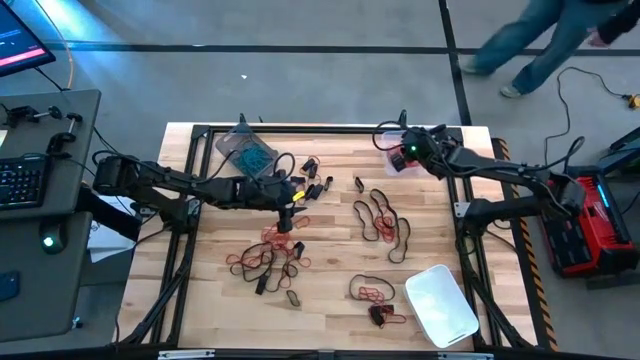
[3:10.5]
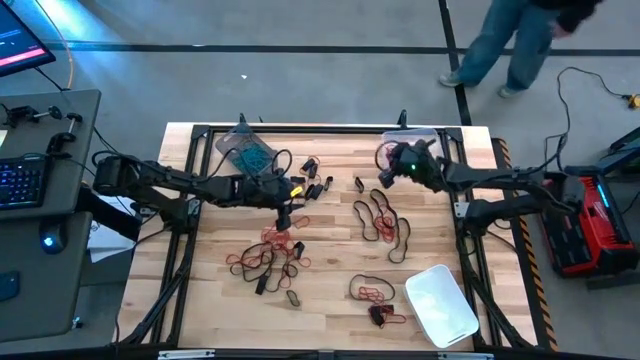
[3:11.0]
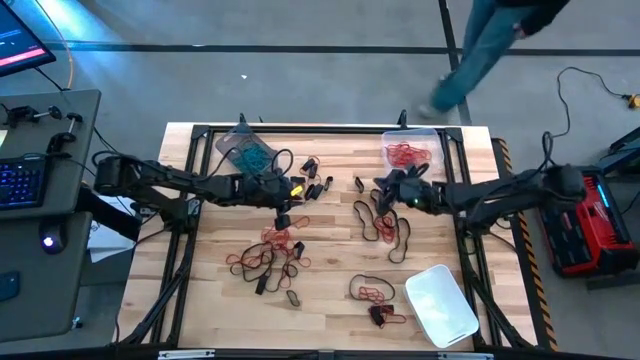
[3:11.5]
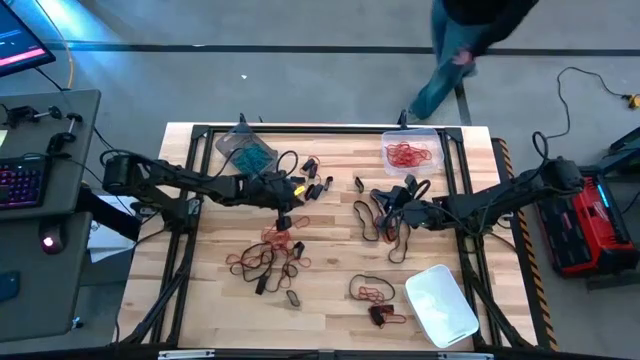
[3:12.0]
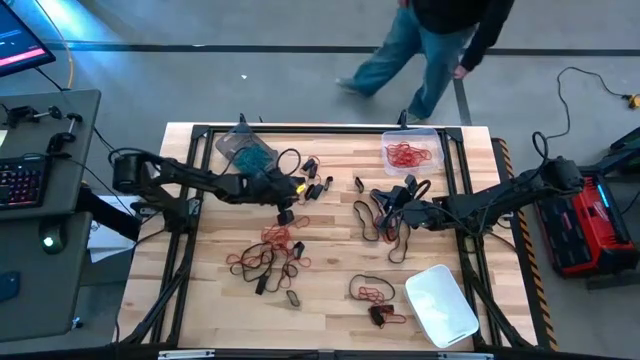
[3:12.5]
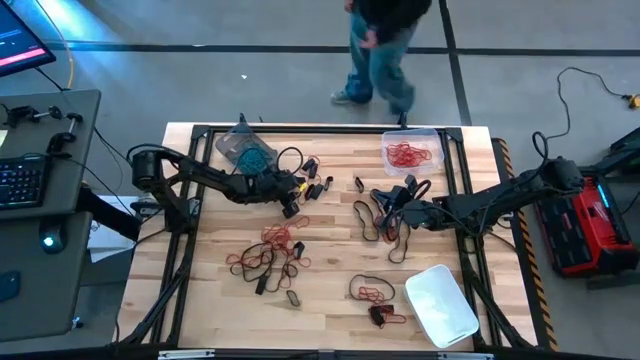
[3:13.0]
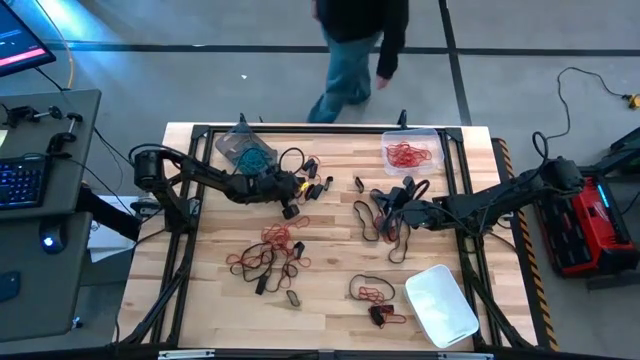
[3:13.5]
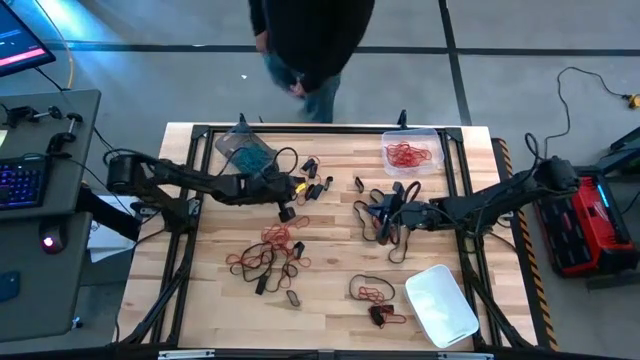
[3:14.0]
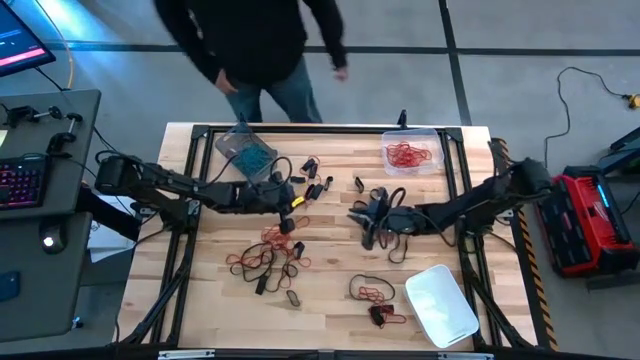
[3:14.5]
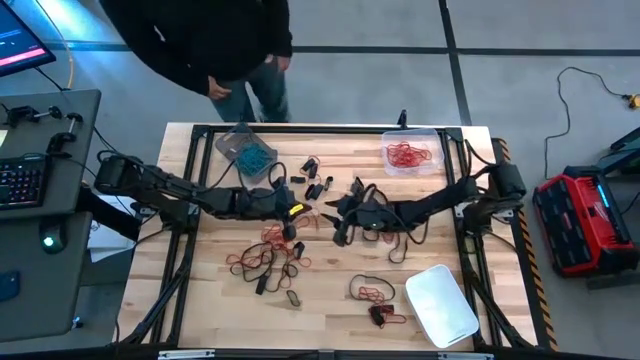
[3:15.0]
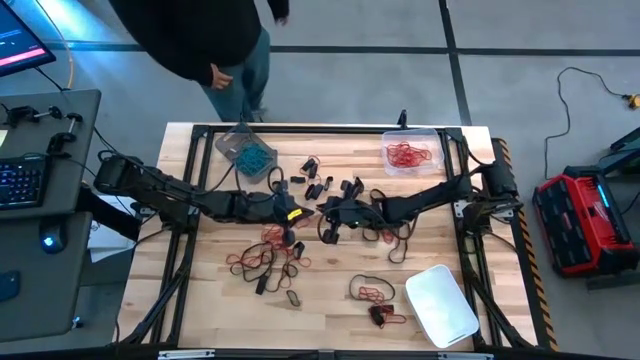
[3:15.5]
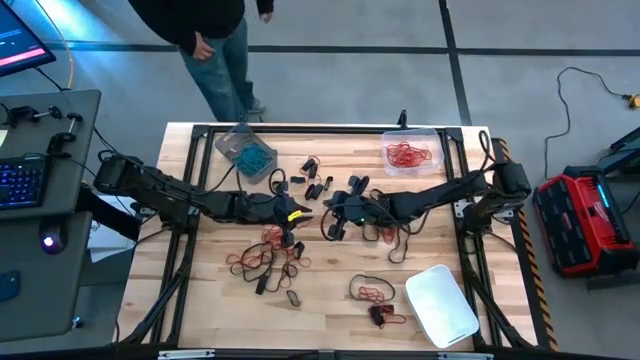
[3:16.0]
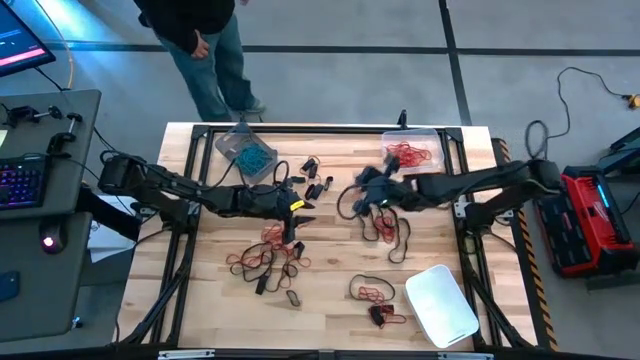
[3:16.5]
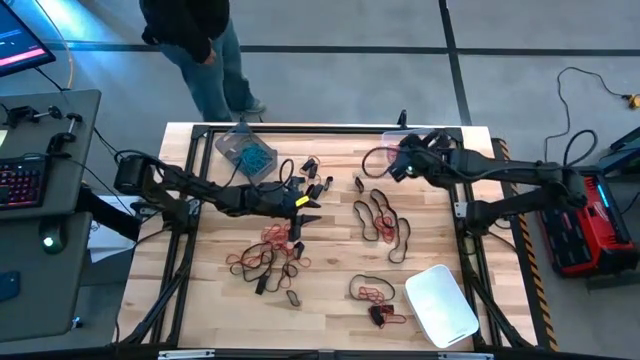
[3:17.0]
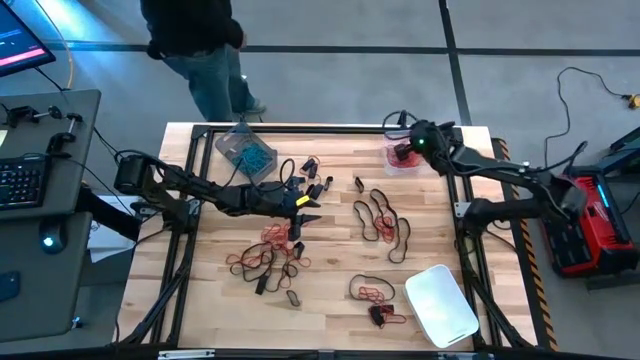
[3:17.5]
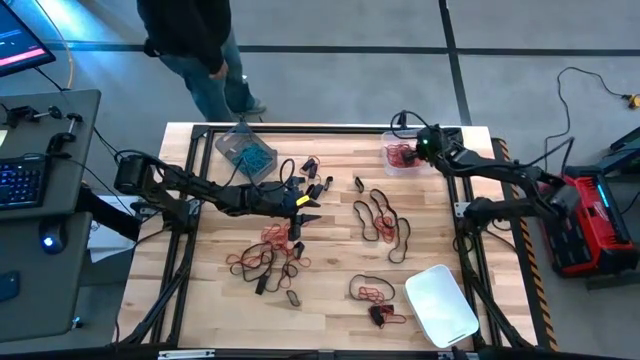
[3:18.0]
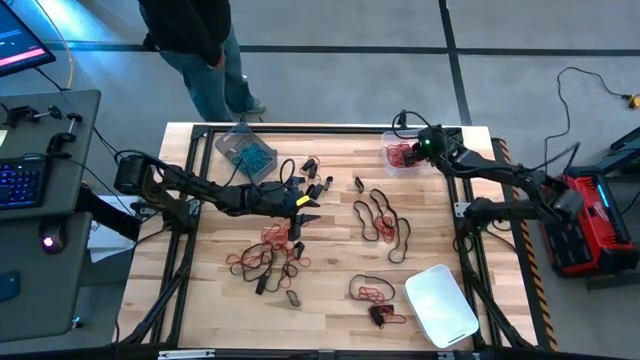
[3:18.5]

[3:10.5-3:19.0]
Task: Sort rubber bands into baskets
Put the red rubber band into the transparent bin

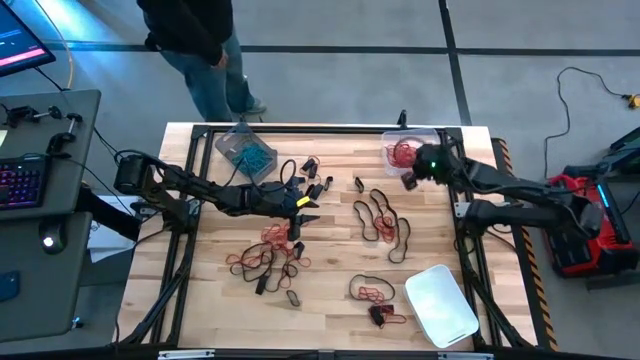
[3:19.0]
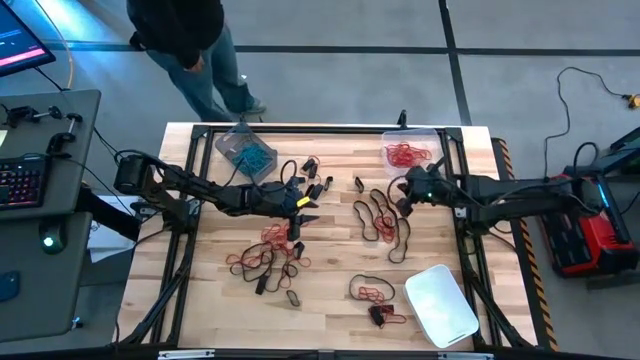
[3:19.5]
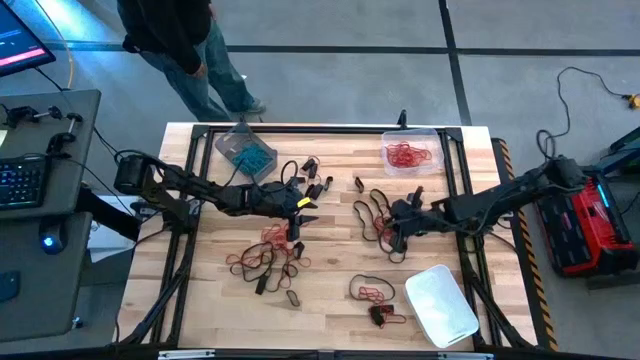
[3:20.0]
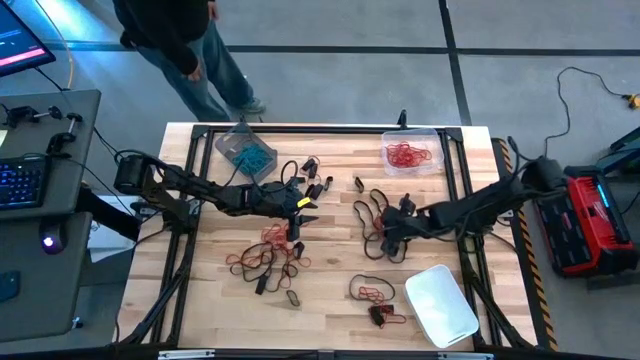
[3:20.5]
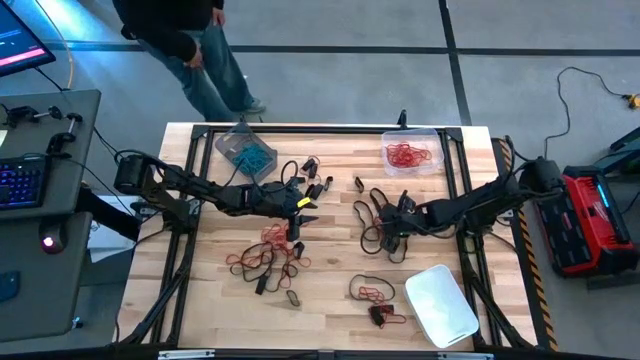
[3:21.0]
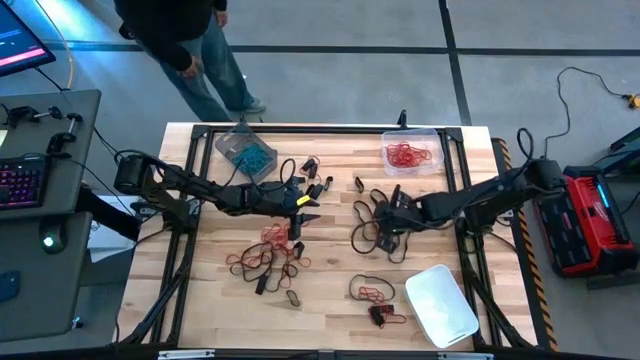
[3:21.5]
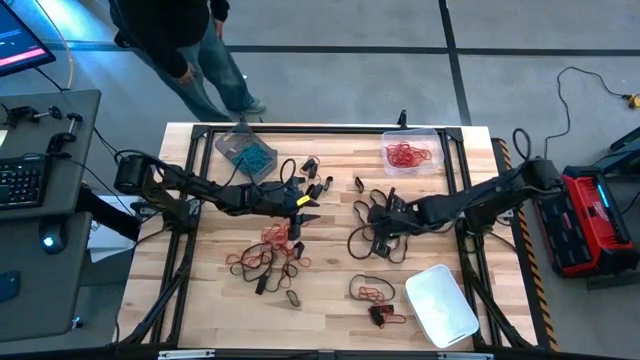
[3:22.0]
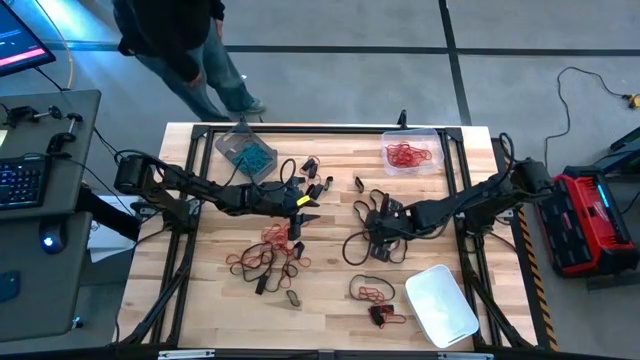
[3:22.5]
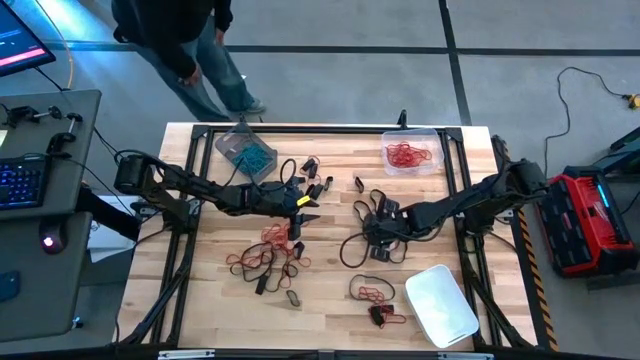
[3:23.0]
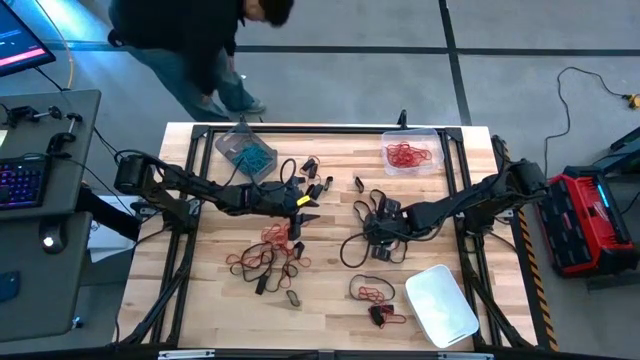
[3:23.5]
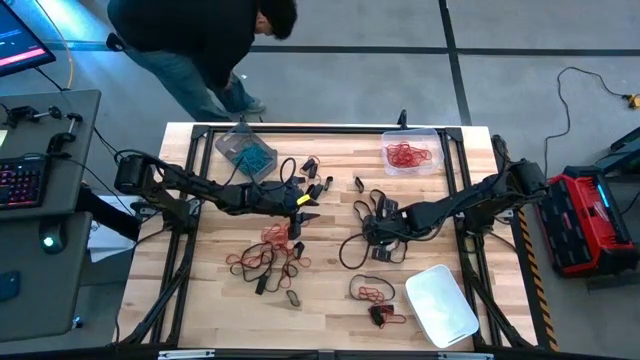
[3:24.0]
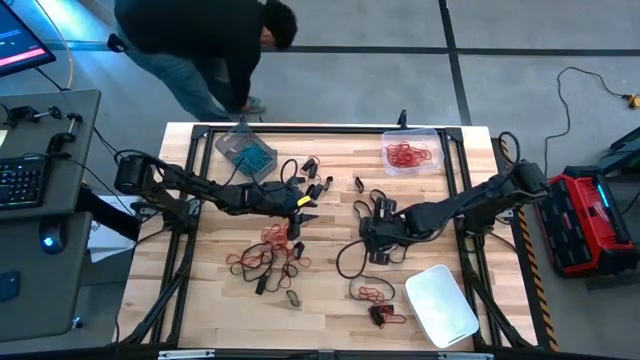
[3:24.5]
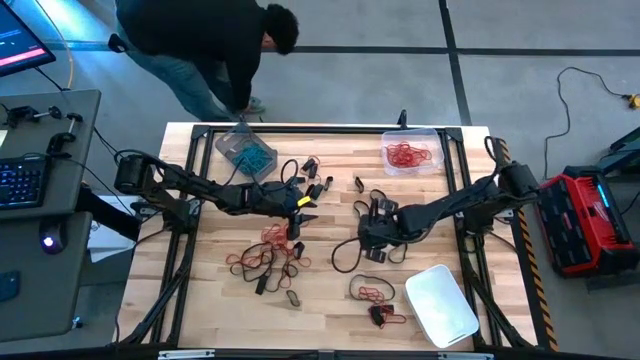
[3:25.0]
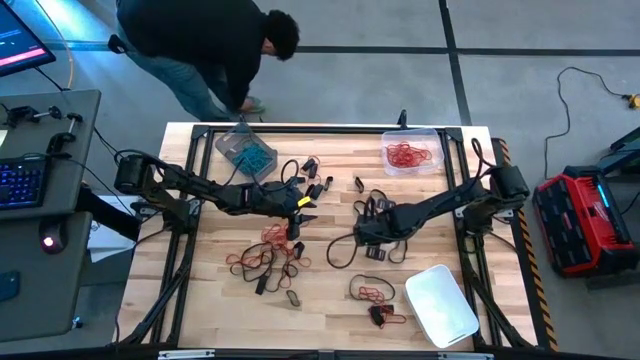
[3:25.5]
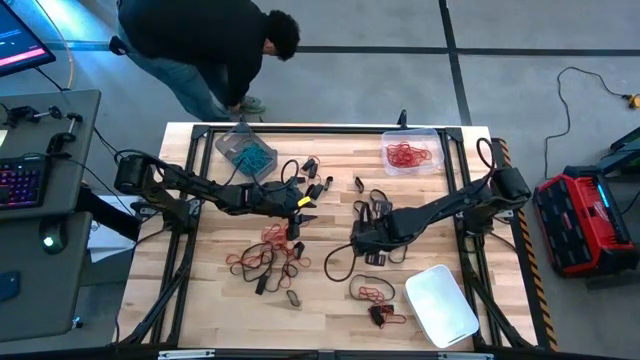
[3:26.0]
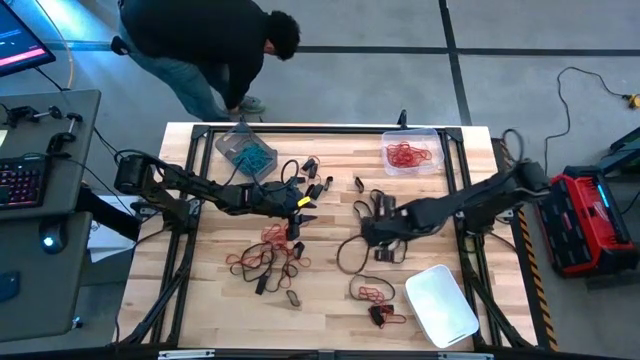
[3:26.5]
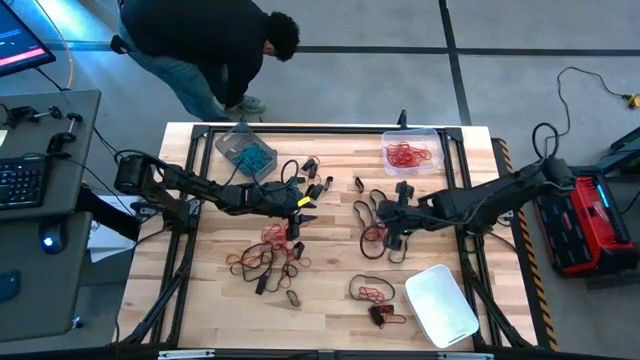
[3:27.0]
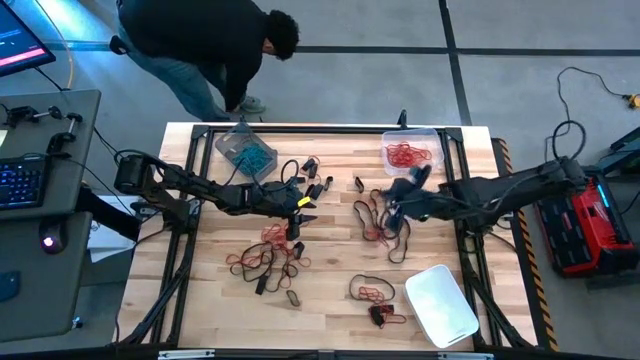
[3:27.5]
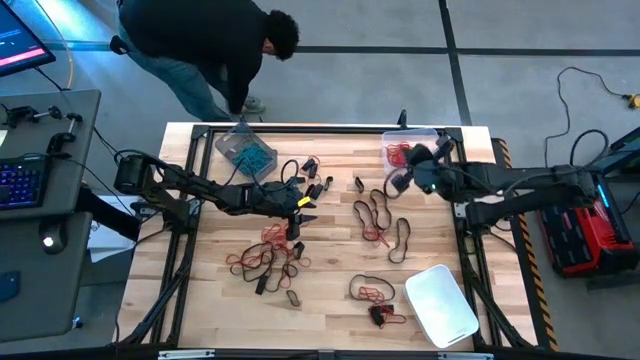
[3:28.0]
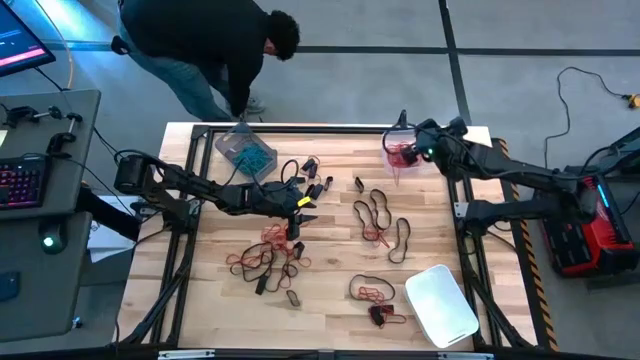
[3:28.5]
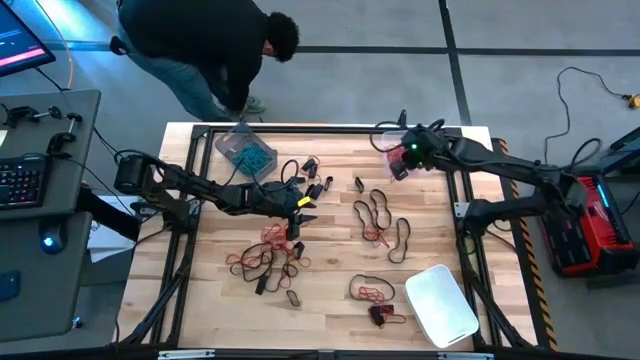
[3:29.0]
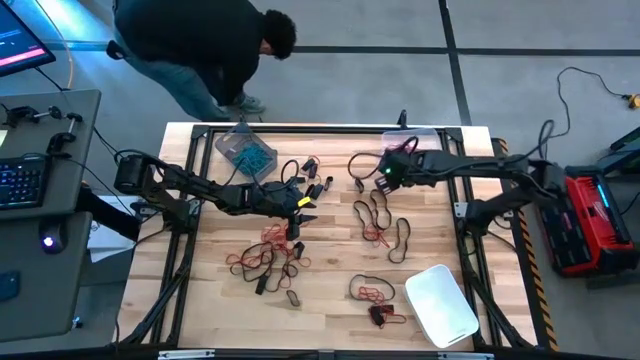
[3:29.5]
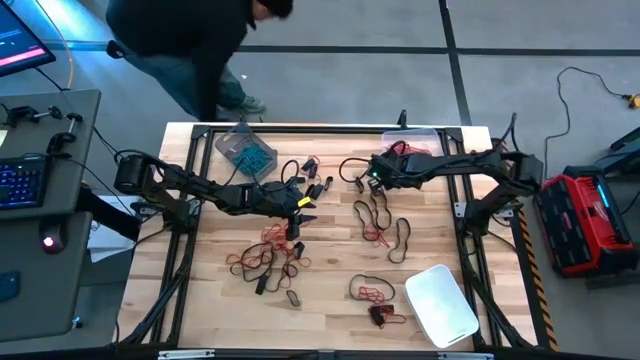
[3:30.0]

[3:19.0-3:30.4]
Put the red rubber band into the transparent bin

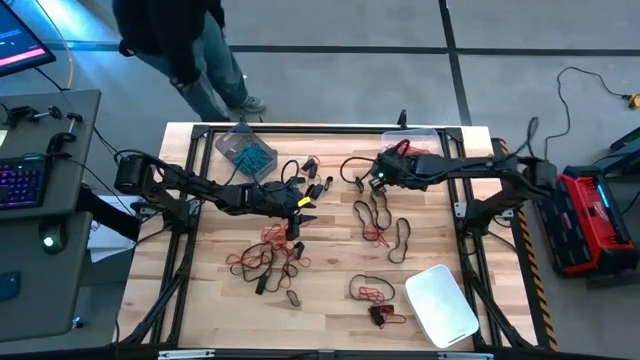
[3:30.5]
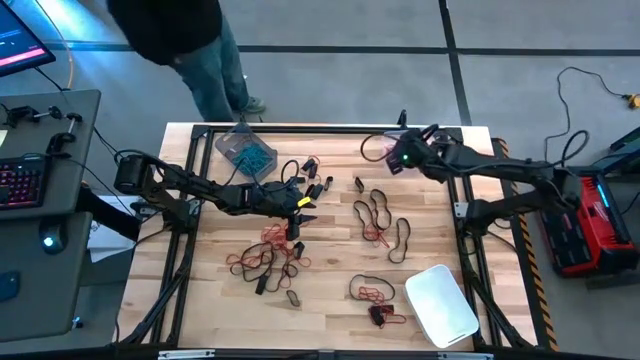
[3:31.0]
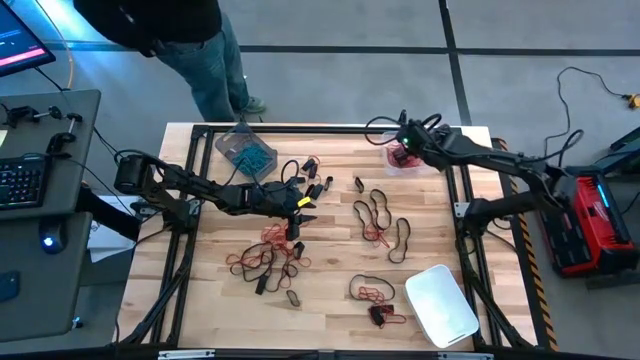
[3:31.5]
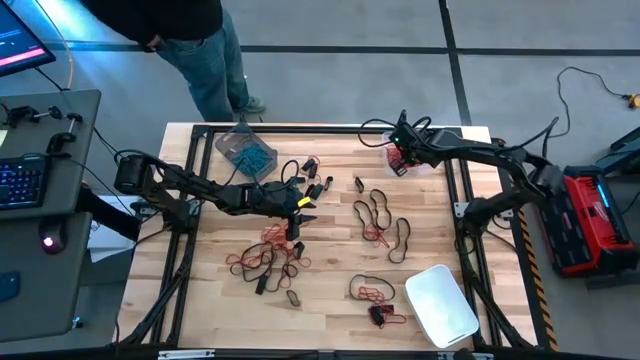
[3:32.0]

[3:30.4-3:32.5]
Put the red rubber band into the transparent bin
